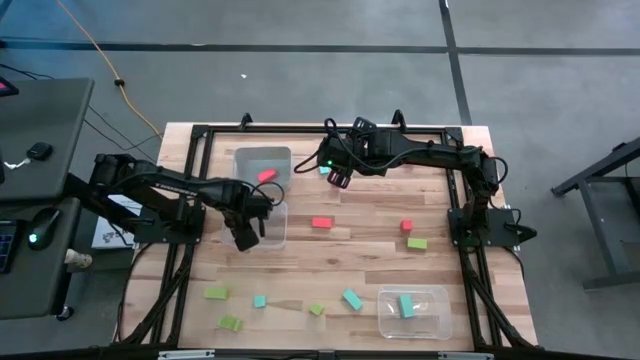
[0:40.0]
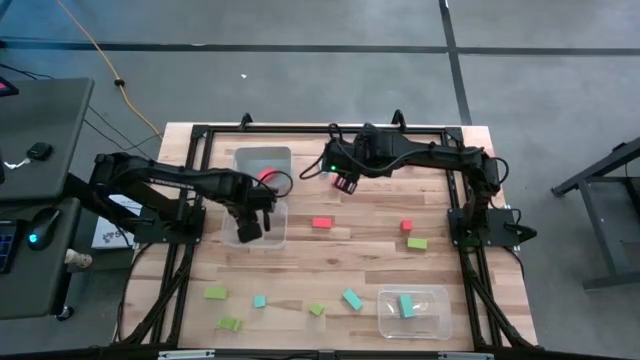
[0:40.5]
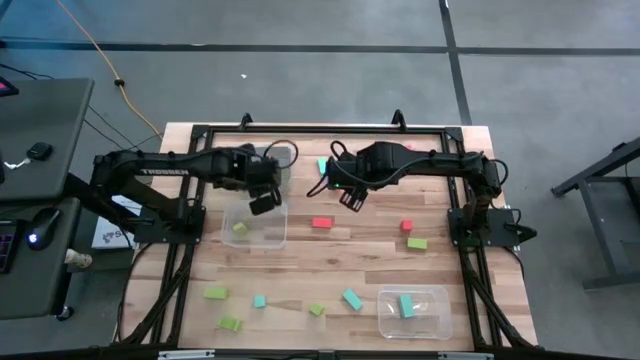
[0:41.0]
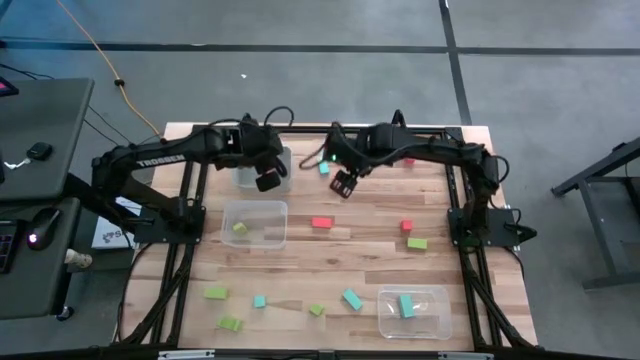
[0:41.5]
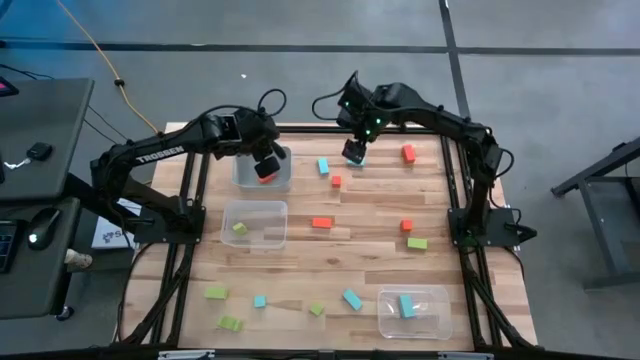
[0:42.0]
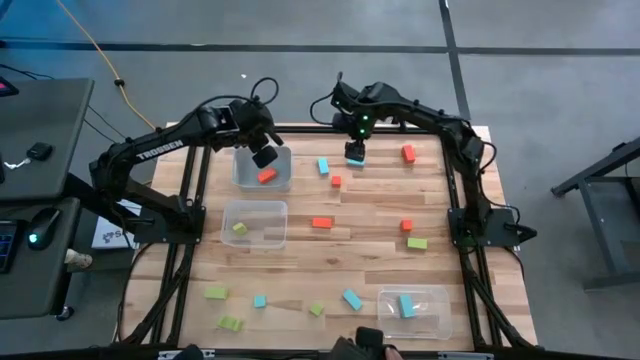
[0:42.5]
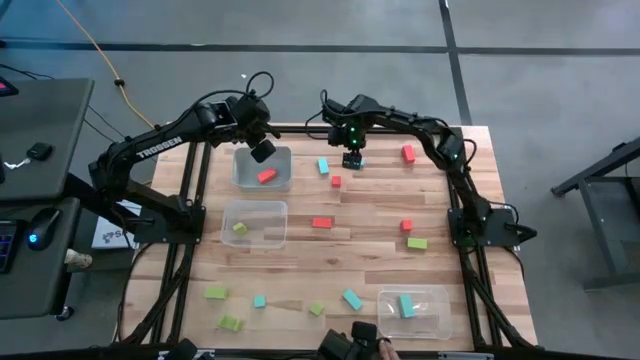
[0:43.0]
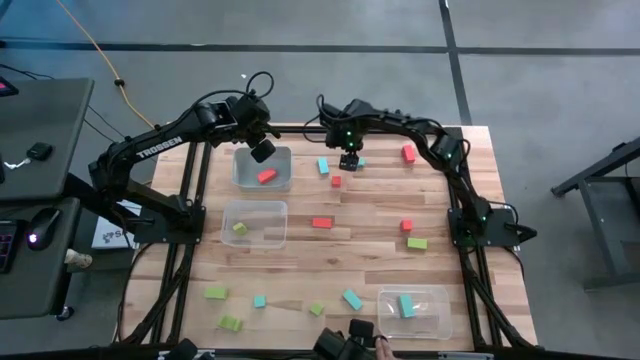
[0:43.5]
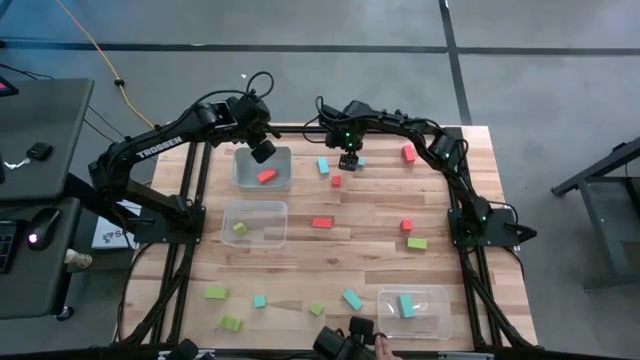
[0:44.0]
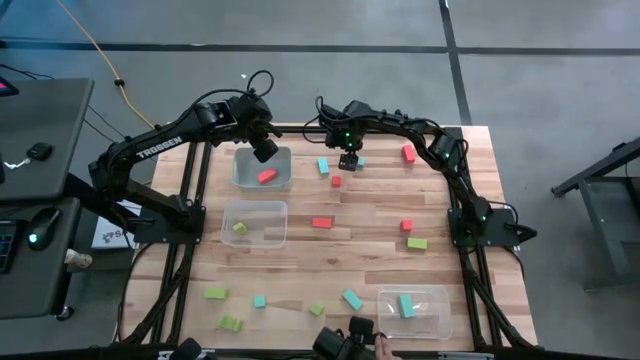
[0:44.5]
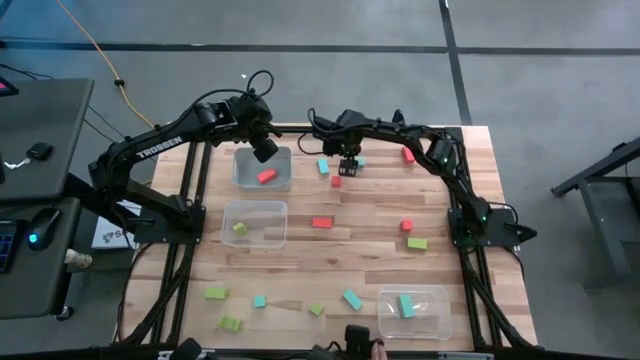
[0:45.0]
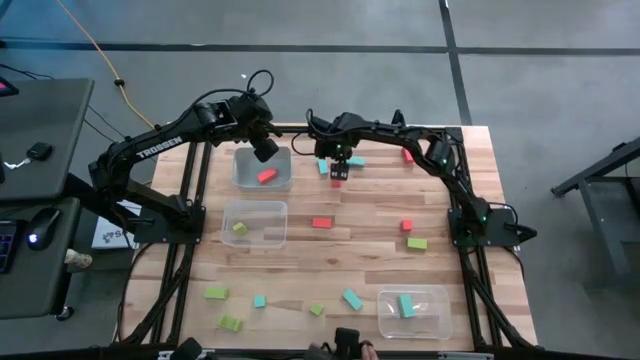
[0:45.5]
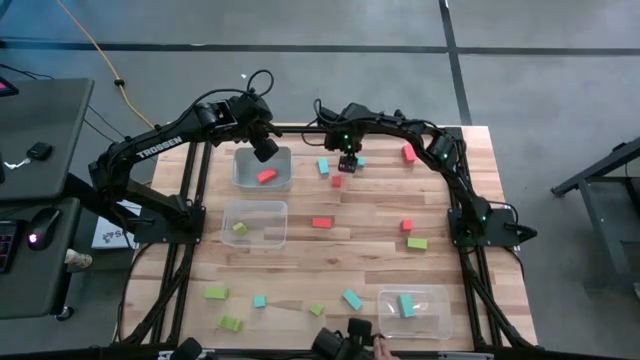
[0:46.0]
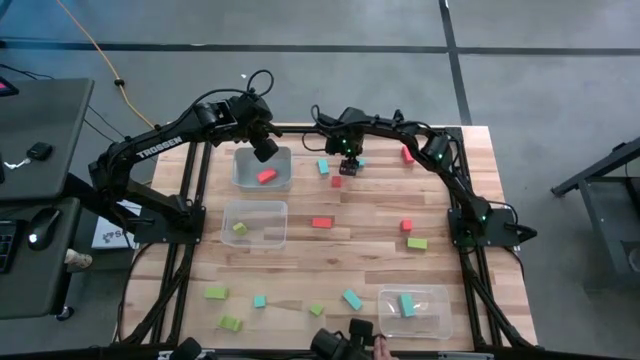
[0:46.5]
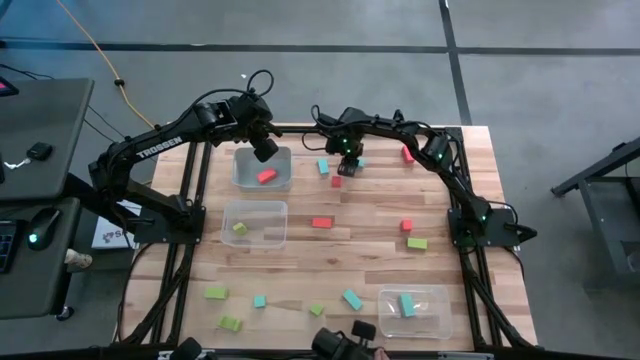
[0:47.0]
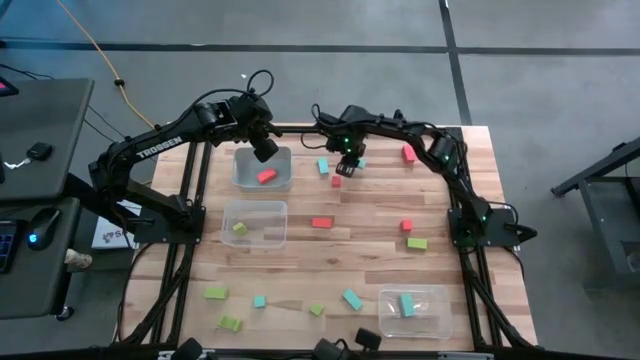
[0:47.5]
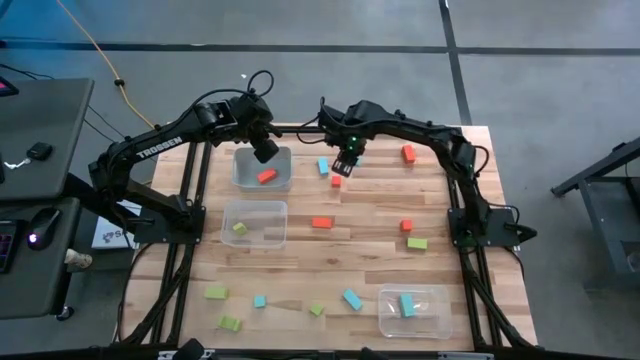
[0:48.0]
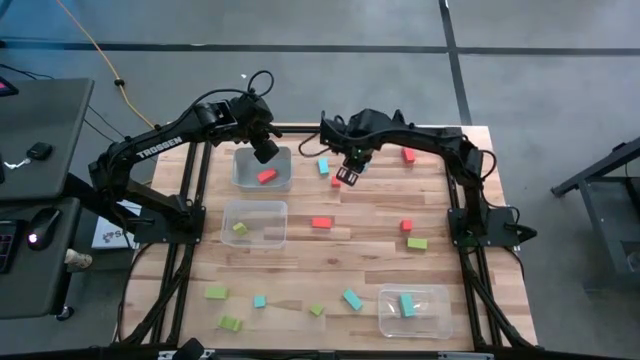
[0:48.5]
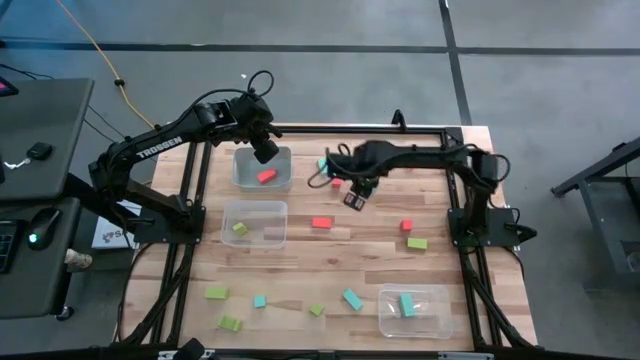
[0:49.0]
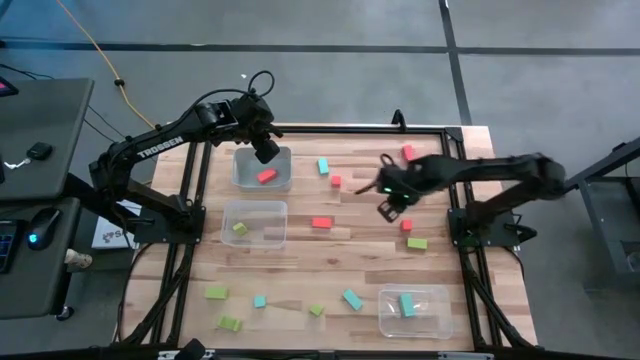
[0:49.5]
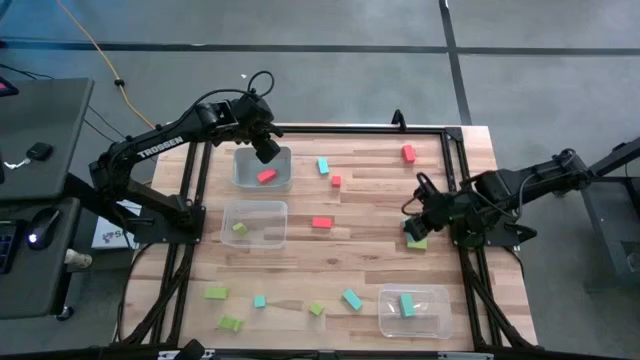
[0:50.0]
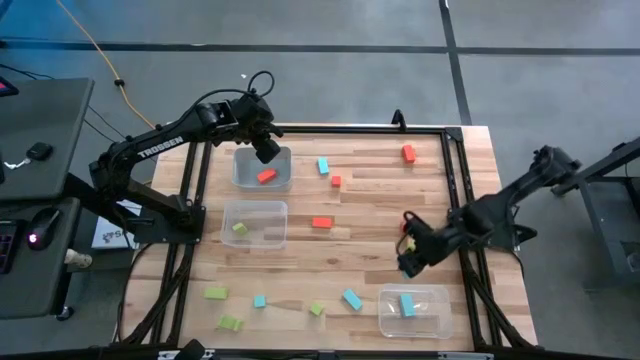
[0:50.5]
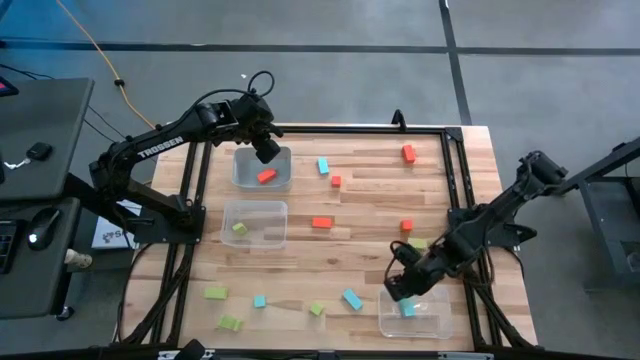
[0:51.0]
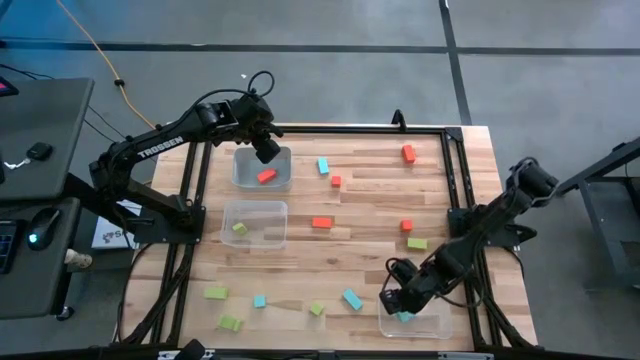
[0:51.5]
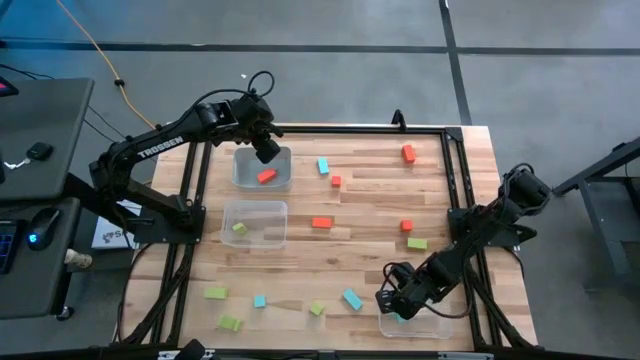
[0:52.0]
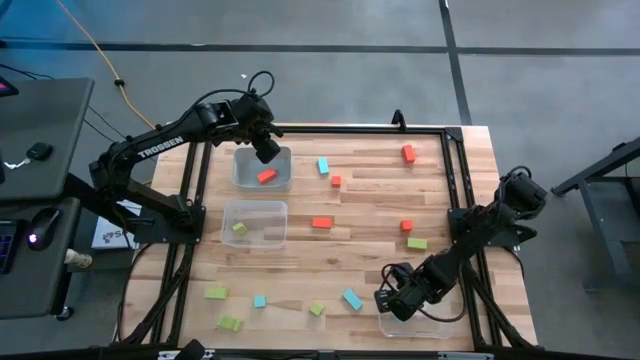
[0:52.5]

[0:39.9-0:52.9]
Task: Sort & place blocks by color
Put the blue block into the bottom transparent bin

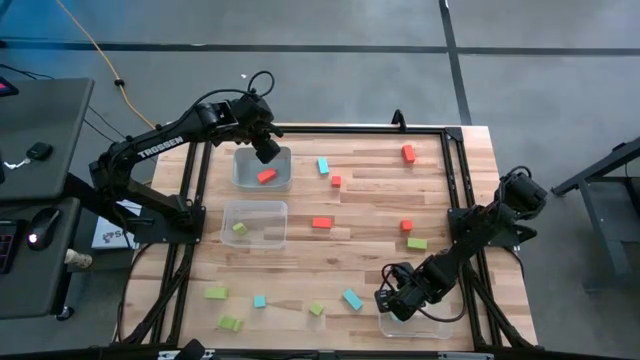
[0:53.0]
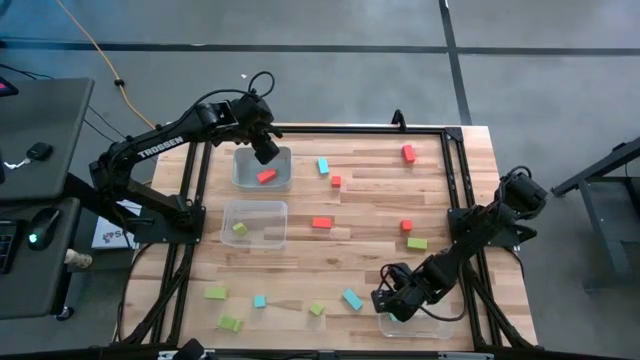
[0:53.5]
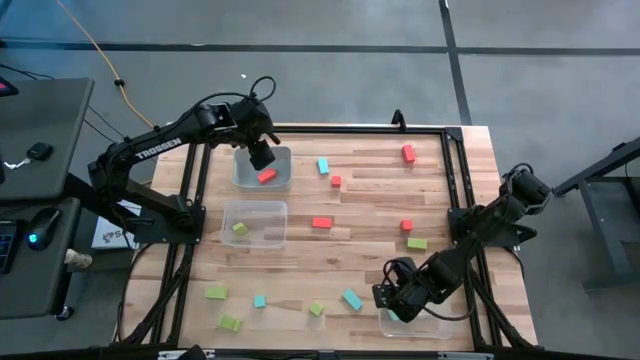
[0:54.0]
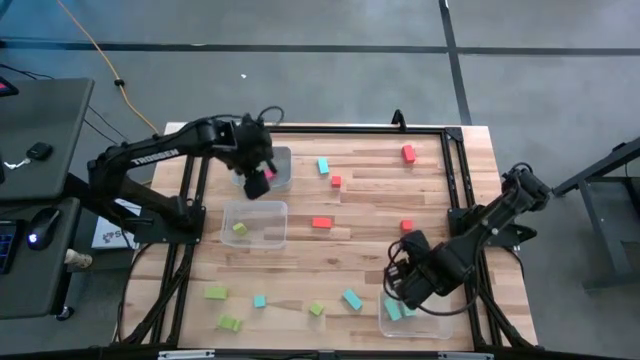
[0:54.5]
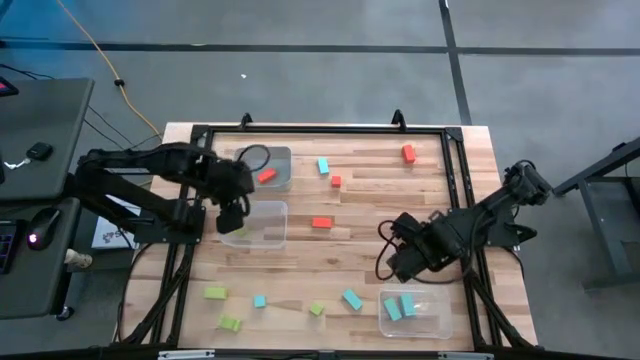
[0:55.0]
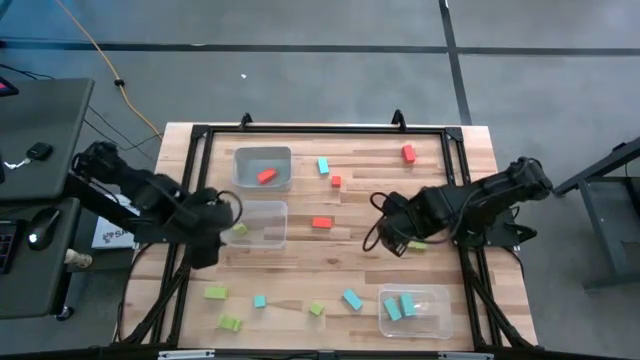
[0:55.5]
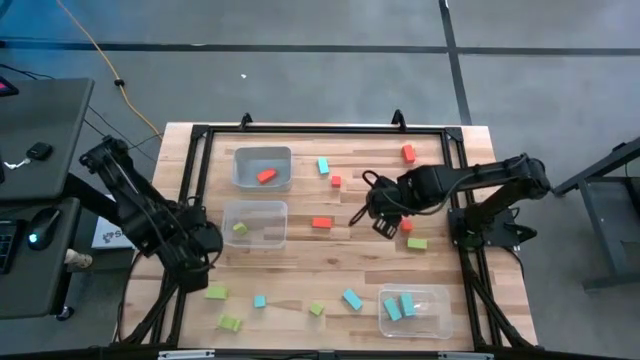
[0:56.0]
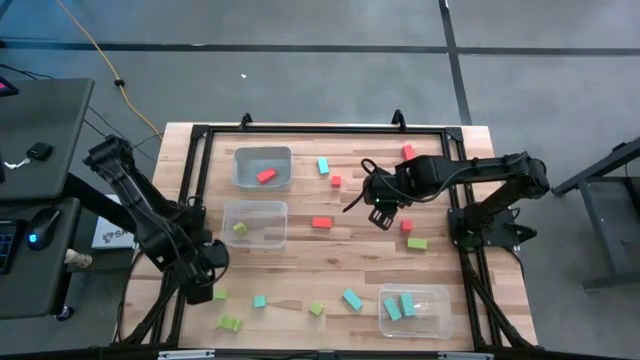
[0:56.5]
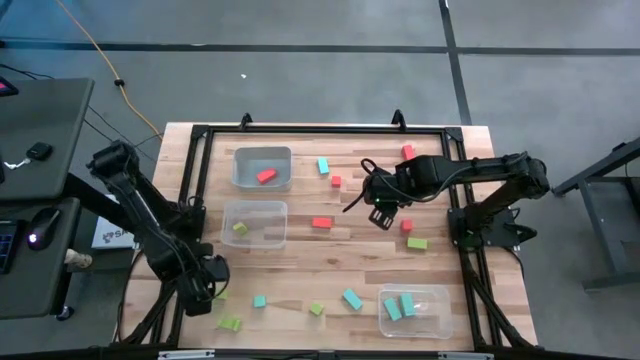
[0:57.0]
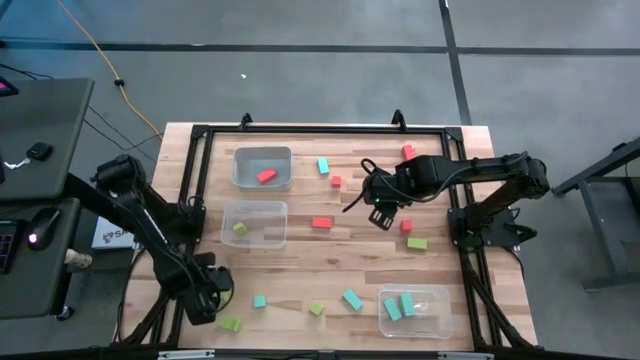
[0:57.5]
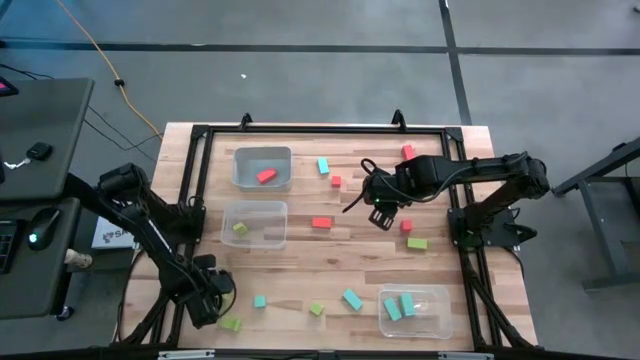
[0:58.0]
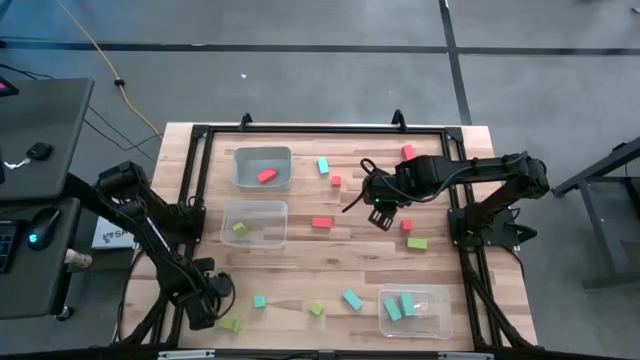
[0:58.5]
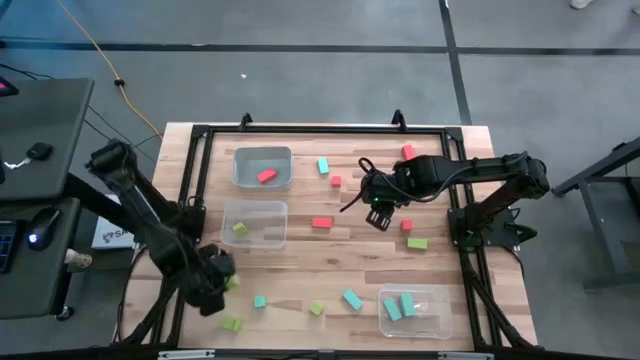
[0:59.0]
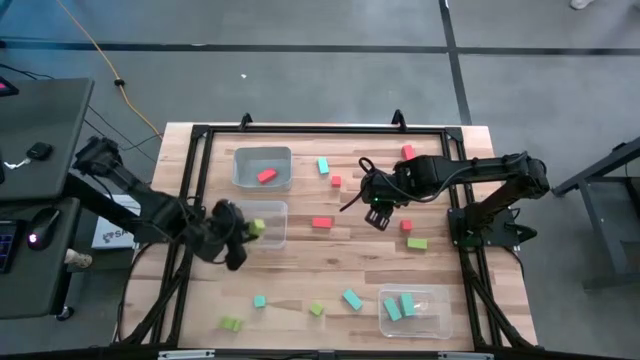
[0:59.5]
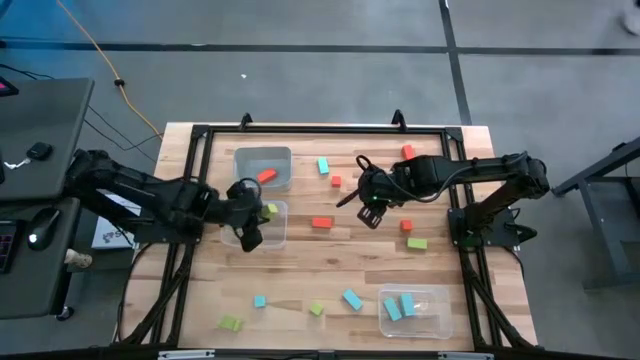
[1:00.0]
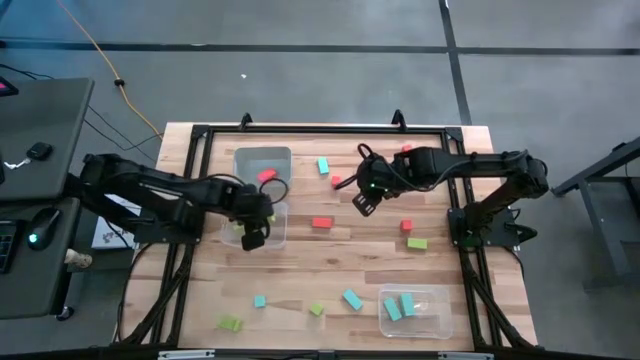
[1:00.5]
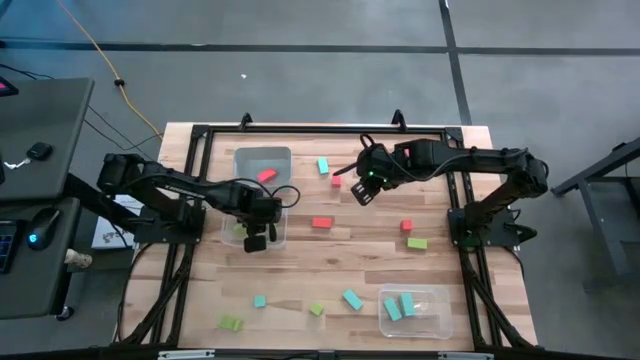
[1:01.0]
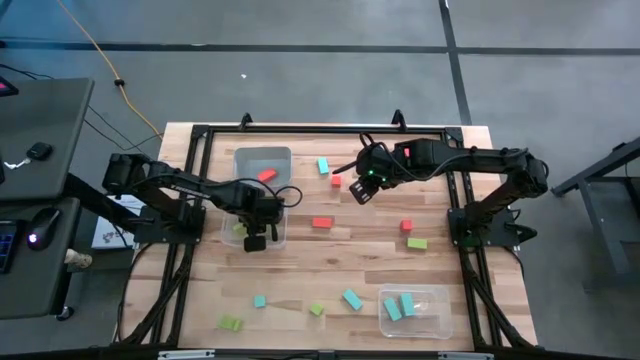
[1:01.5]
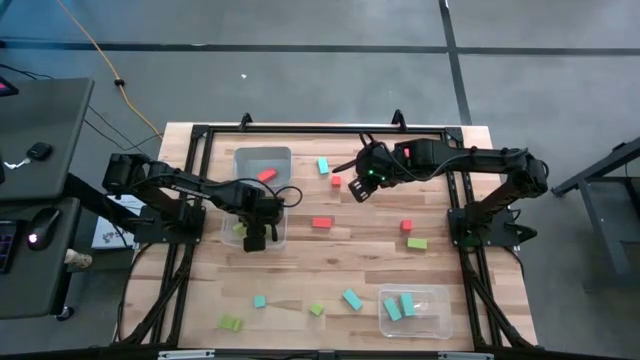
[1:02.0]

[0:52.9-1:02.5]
Put the green block into the top transparent bin
